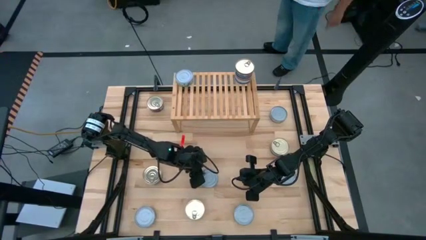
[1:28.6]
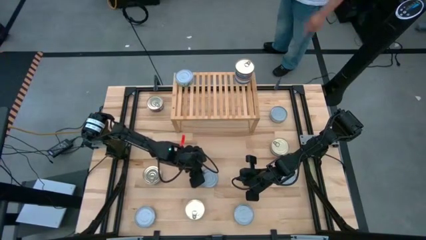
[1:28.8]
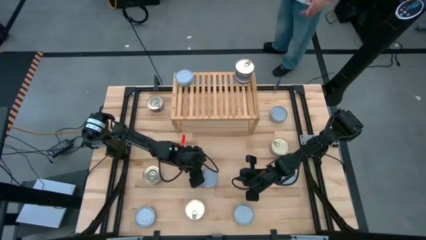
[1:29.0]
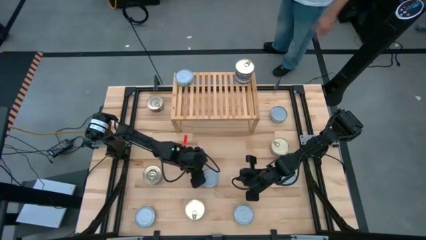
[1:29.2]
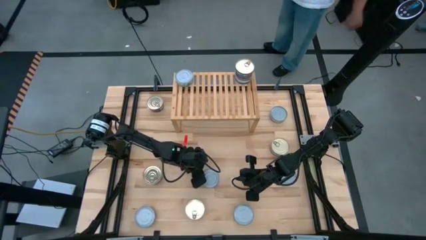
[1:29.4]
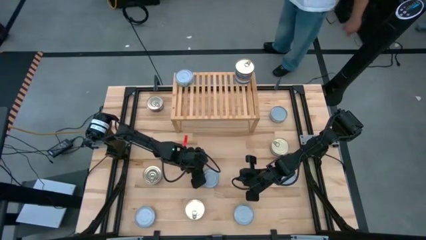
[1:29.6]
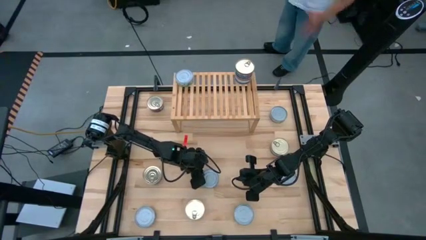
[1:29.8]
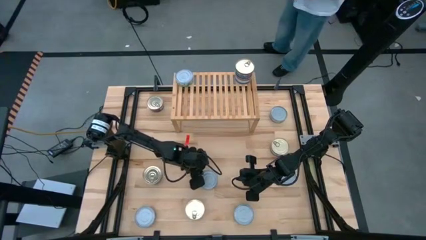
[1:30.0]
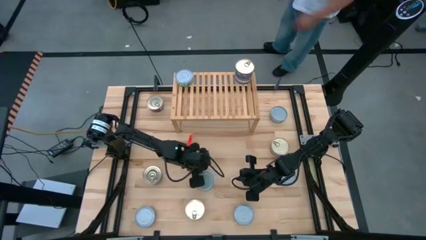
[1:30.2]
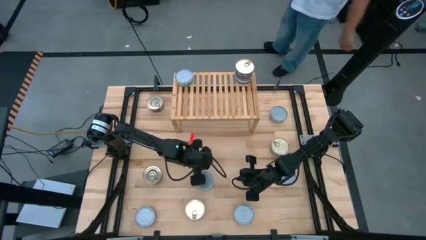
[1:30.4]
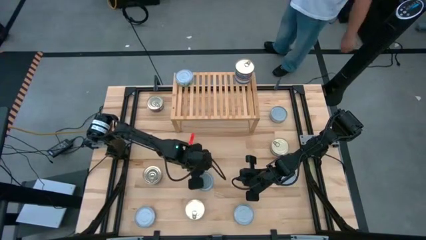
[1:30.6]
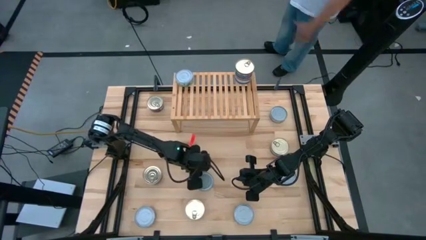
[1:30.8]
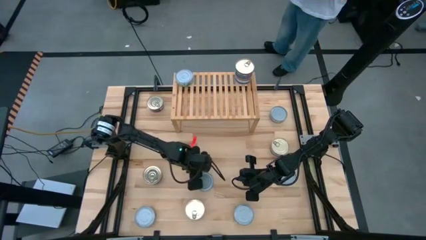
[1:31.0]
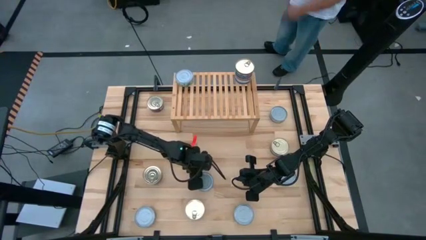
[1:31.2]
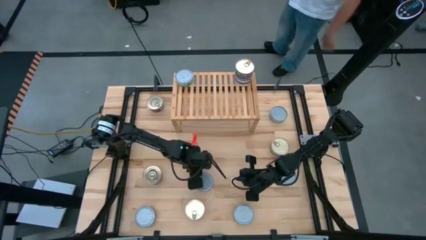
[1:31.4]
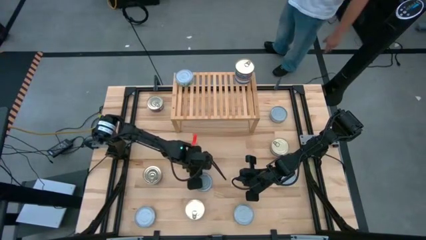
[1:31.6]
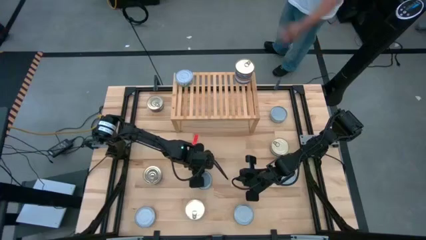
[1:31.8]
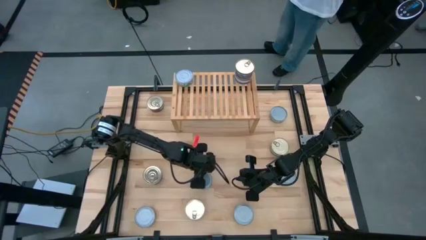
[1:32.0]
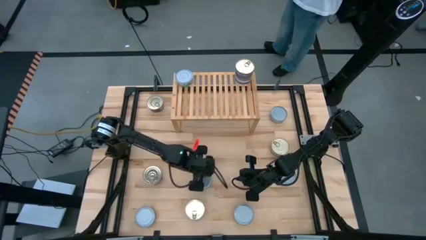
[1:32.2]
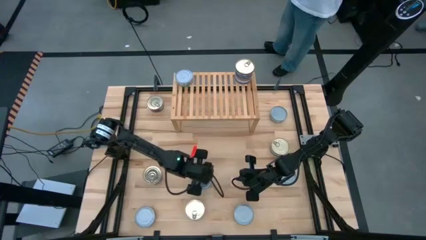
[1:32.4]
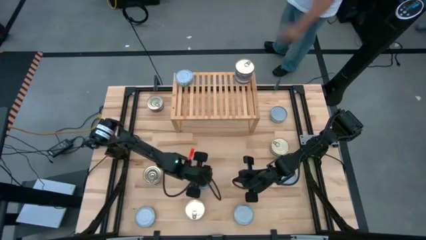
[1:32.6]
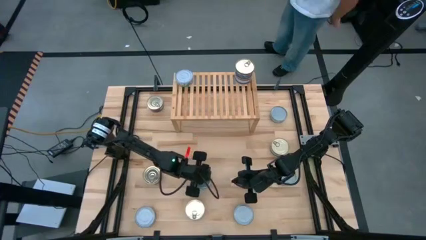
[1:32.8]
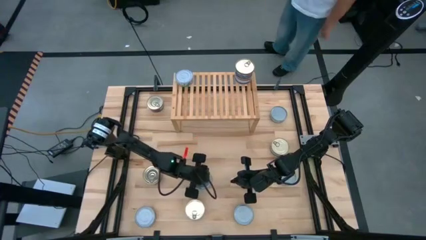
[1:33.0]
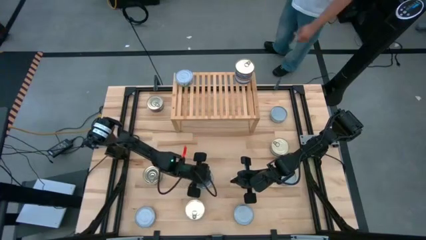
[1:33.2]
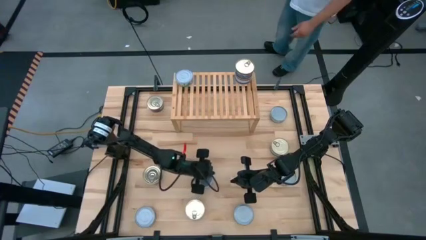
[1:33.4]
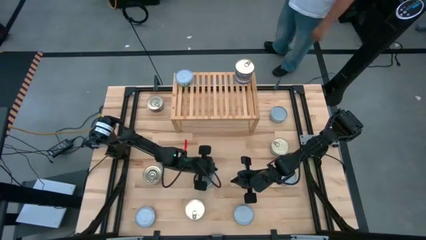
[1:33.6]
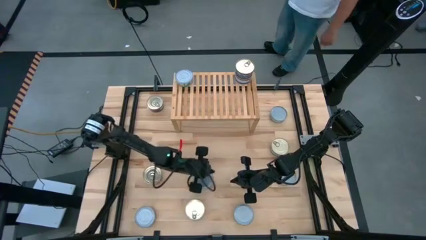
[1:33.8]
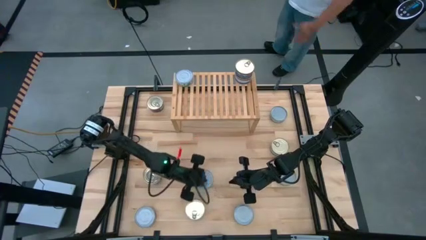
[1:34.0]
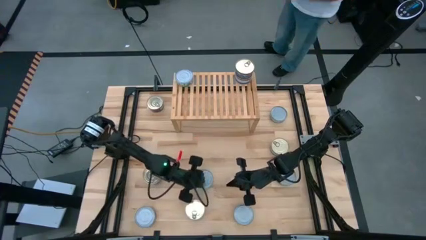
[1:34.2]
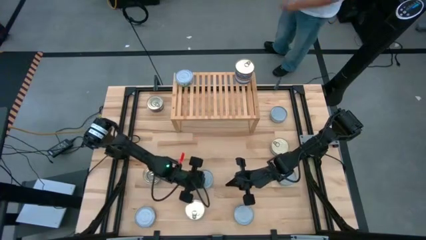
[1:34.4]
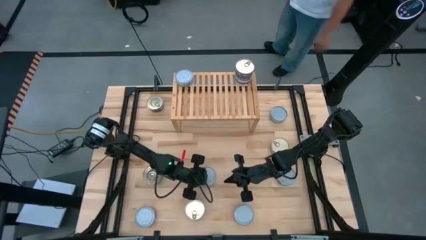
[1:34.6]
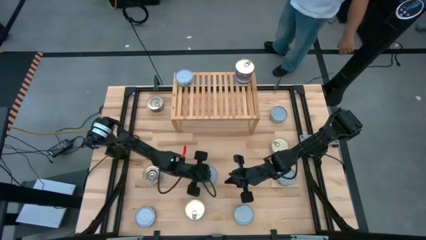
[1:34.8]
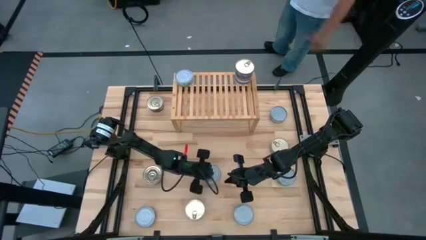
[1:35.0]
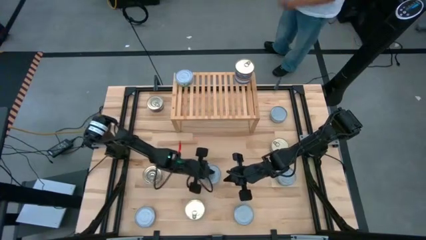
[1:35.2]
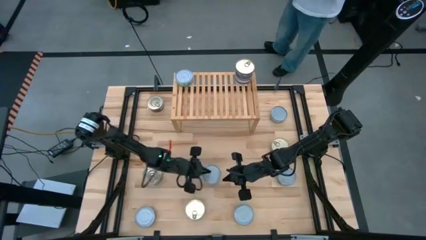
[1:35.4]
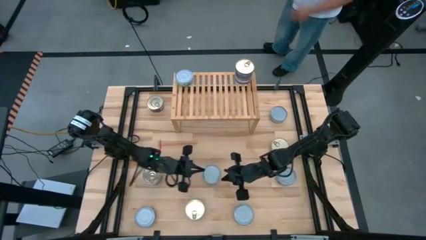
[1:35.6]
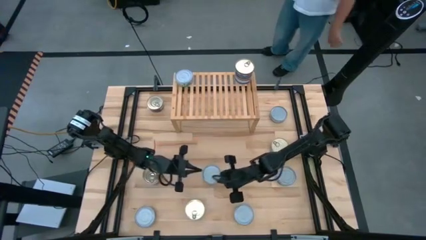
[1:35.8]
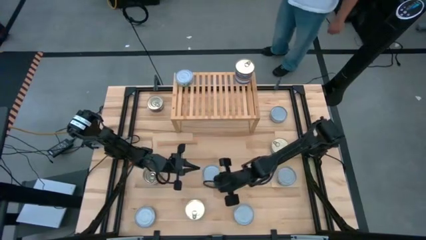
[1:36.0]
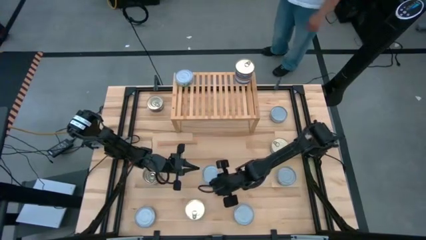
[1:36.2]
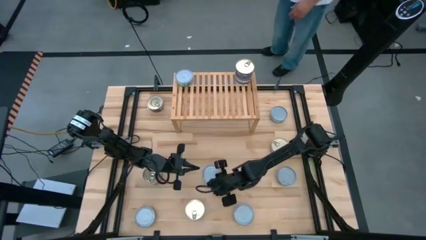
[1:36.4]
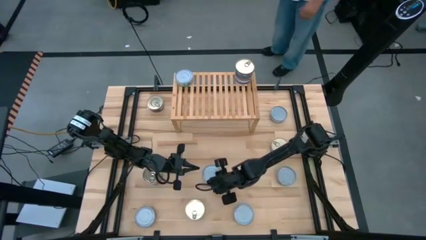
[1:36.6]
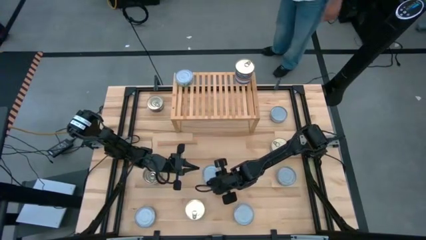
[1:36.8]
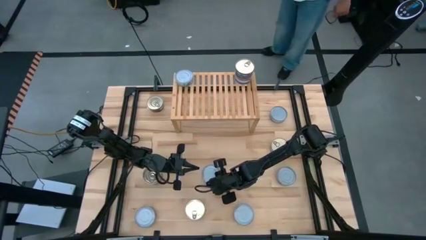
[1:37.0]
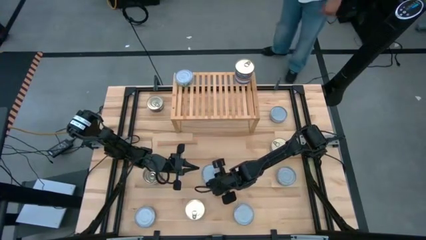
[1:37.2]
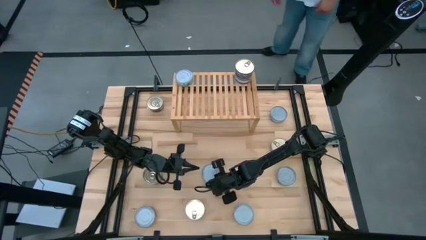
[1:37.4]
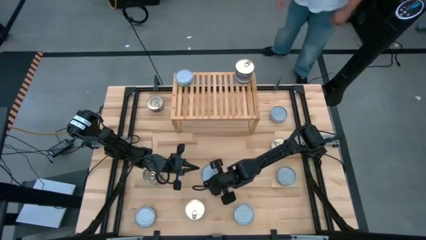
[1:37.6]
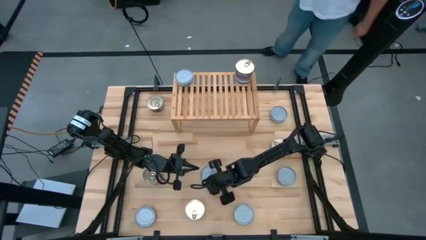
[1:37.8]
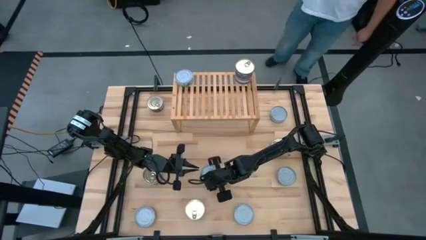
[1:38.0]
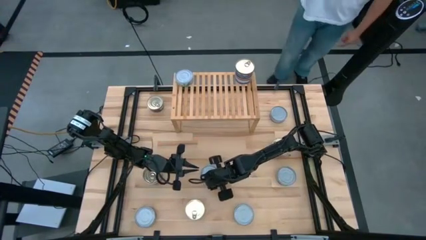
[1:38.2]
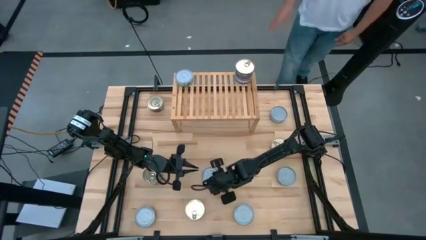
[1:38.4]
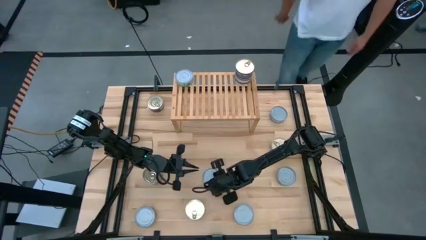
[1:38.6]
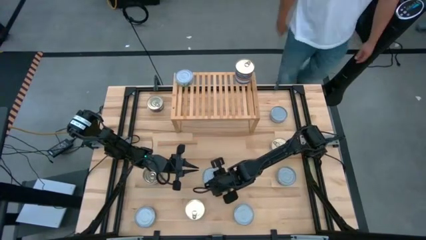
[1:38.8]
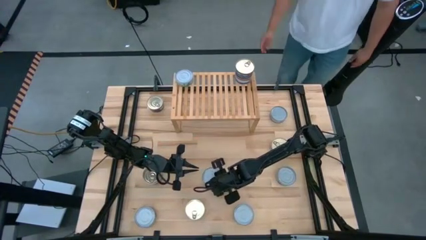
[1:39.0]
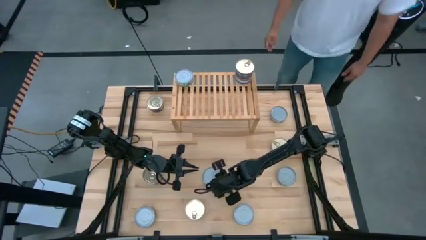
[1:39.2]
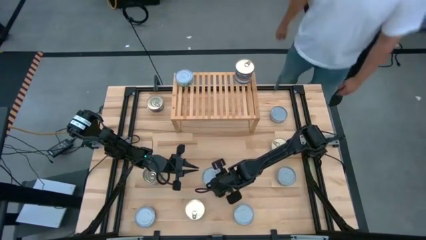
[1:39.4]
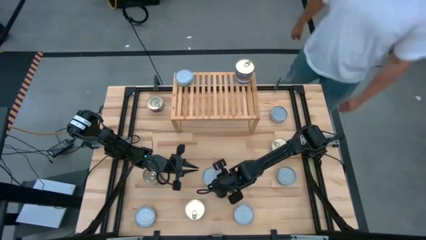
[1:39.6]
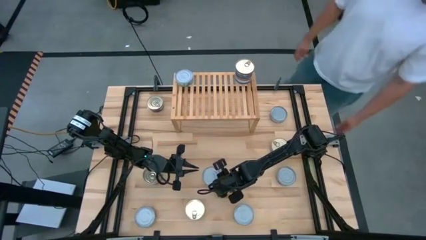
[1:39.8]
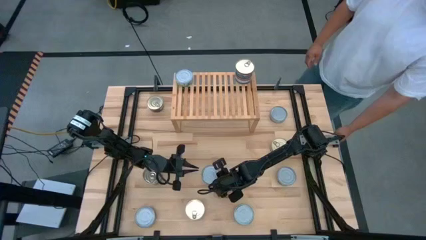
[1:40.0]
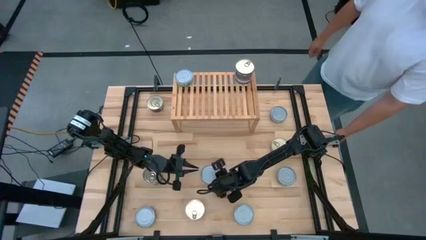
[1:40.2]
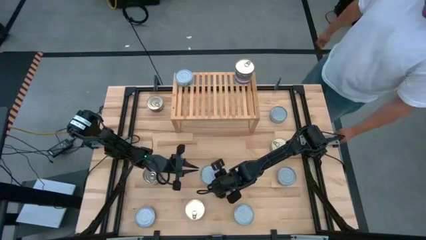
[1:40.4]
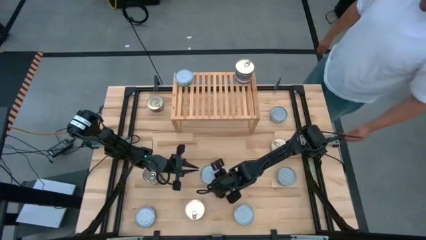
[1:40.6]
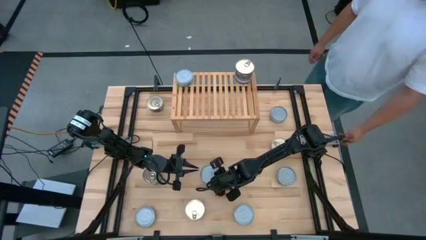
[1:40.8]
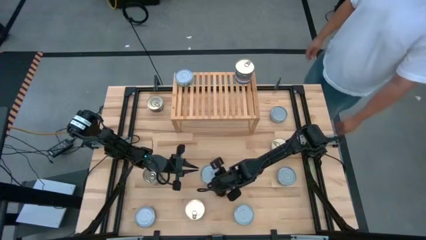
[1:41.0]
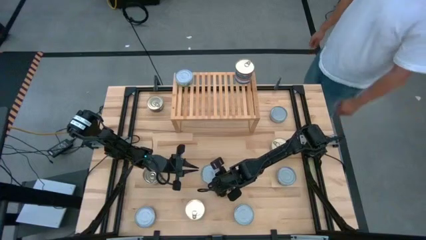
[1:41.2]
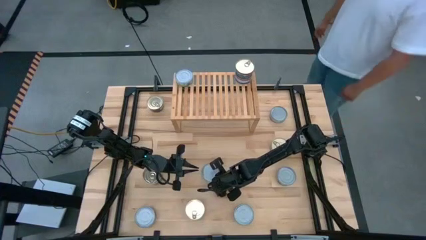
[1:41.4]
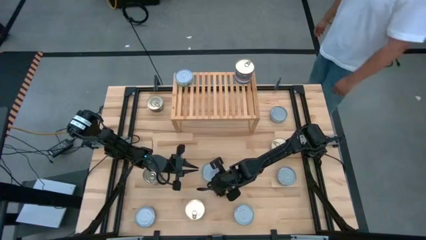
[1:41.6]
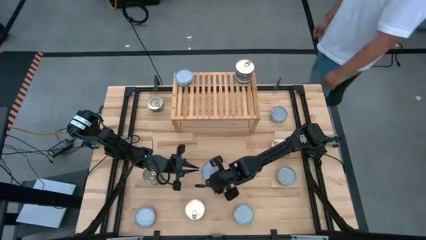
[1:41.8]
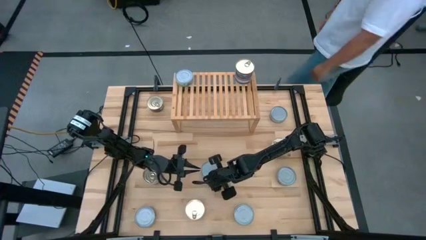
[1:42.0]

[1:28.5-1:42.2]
Task: Stack canned seafood by type on shelf
Stack the green tuna can on top of the other green tuna can on the shelf

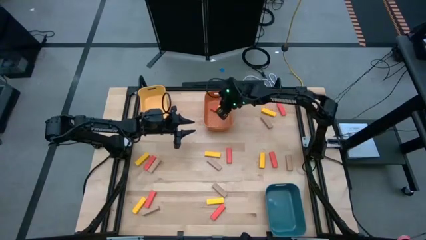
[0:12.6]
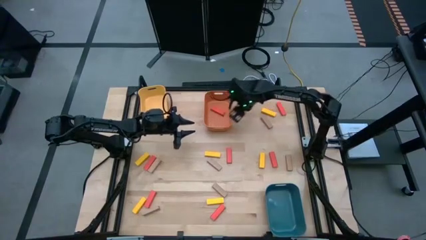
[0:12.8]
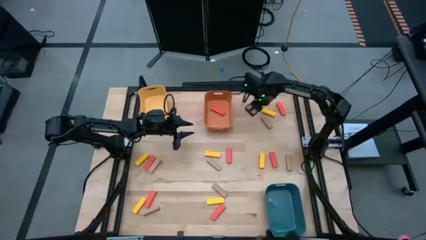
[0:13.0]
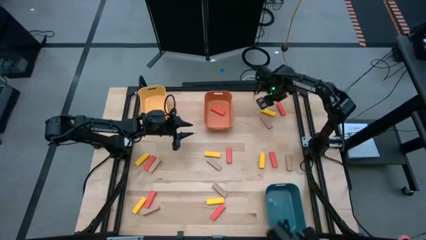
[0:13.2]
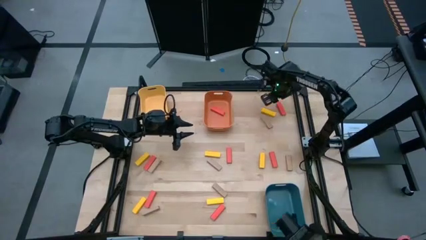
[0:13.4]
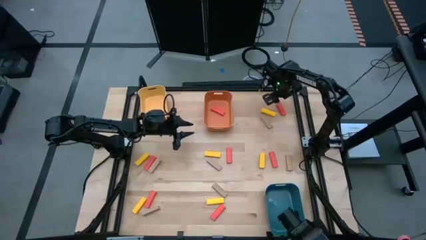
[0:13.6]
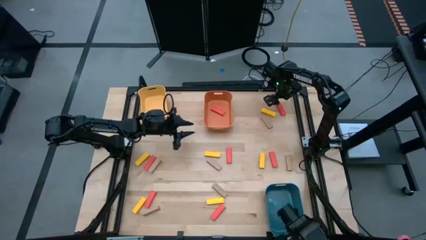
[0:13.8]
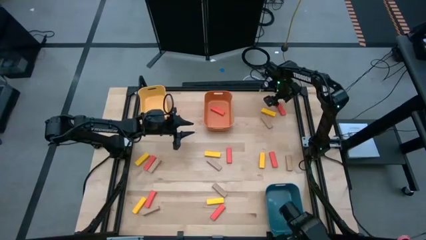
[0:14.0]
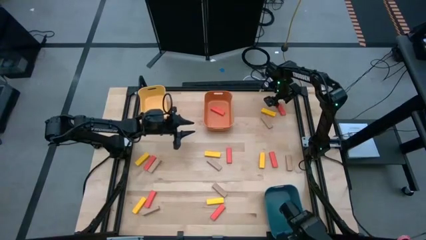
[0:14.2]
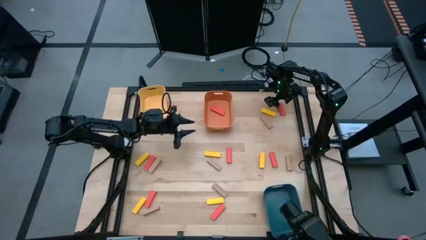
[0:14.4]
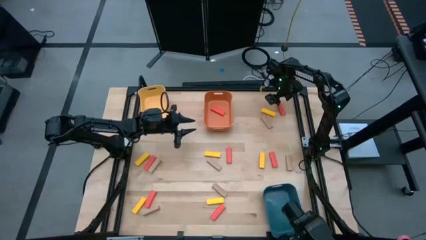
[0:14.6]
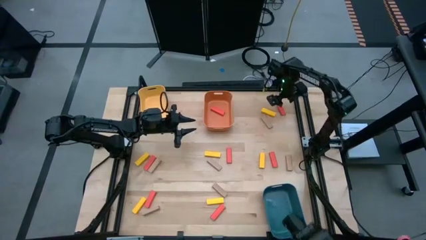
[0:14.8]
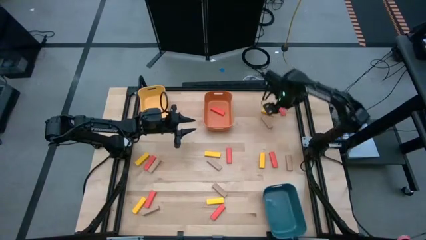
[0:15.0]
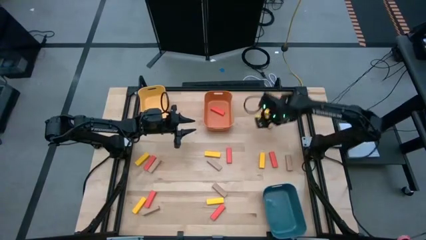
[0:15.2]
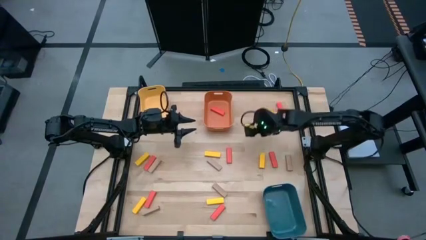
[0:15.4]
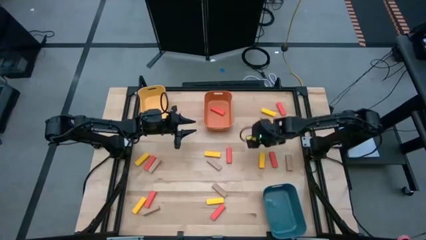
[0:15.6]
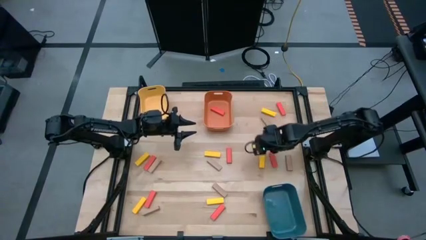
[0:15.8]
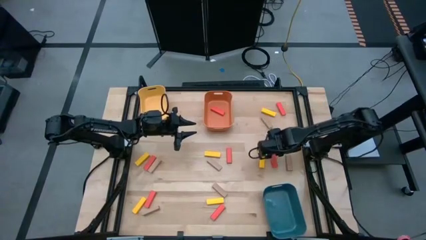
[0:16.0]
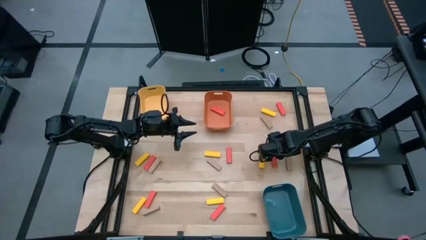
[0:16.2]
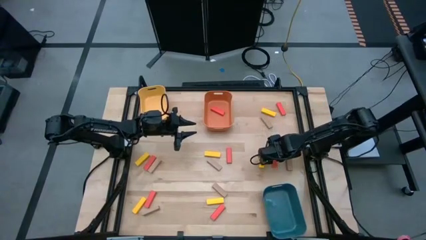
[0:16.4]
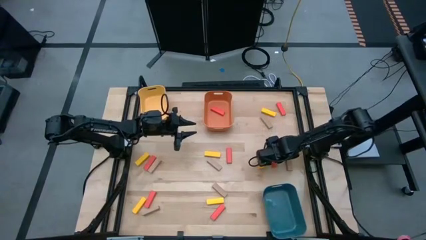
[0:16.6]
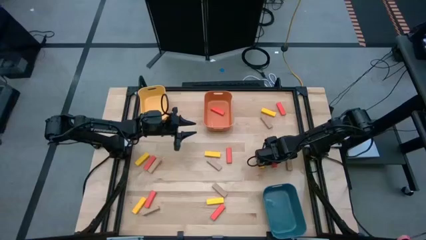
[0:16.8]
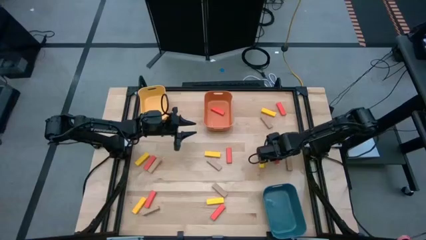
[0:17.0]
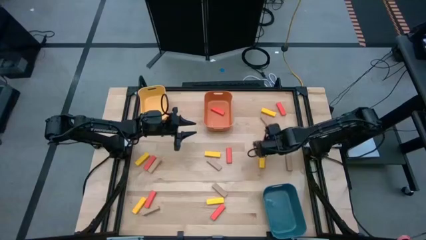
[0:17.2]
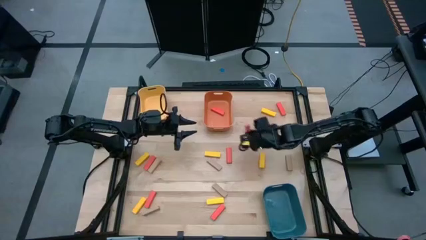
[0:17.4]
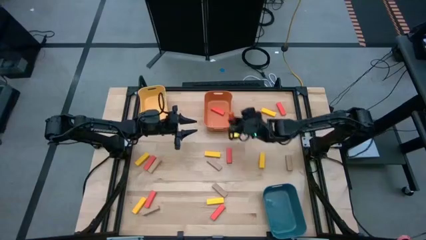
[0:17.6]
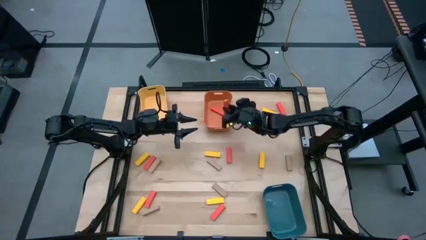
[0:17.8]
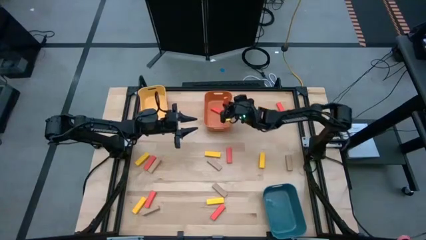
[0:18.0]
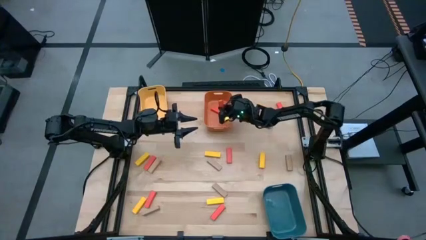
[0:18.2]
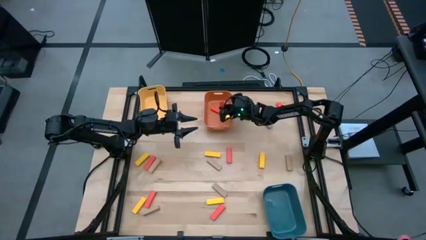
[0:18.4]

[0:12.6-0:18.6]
Task: Sort blocks
Put the orange block into the orange bin
